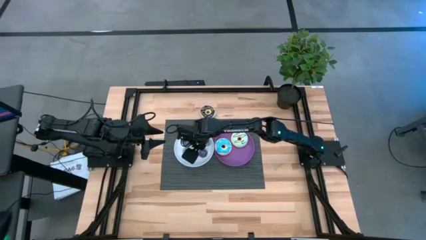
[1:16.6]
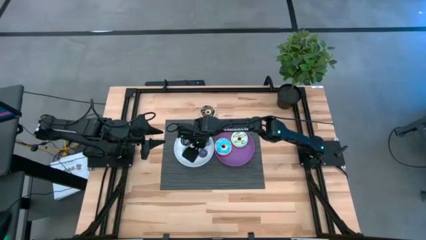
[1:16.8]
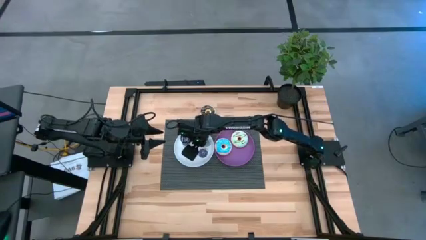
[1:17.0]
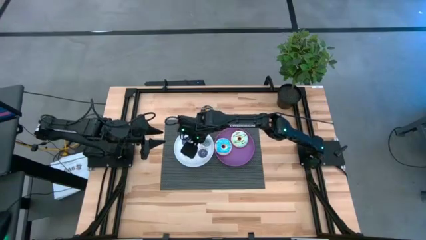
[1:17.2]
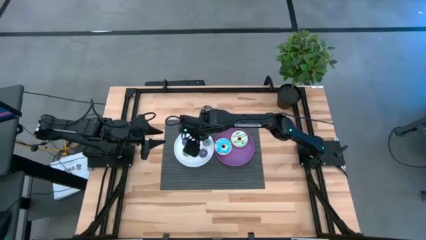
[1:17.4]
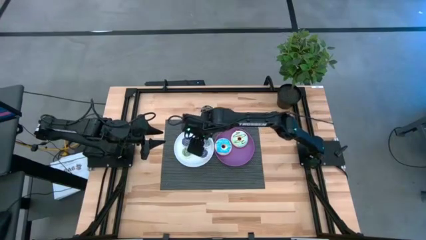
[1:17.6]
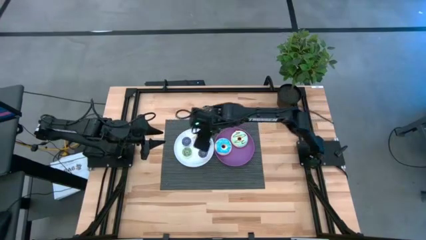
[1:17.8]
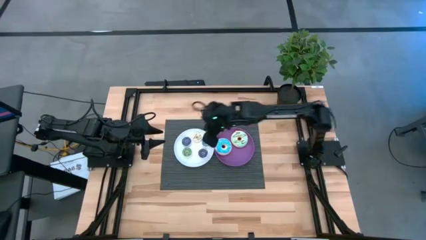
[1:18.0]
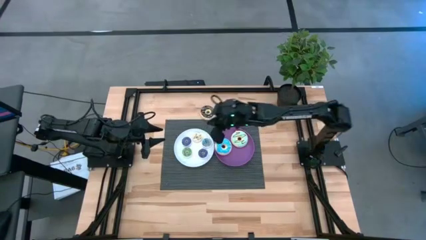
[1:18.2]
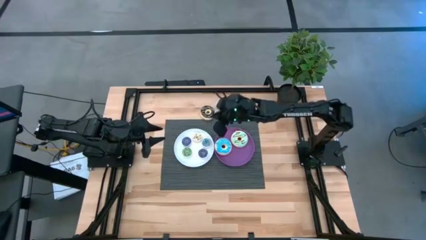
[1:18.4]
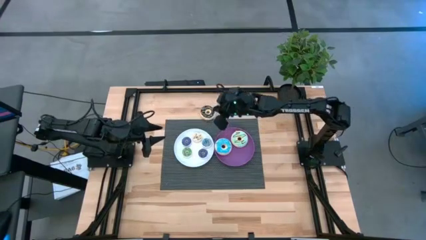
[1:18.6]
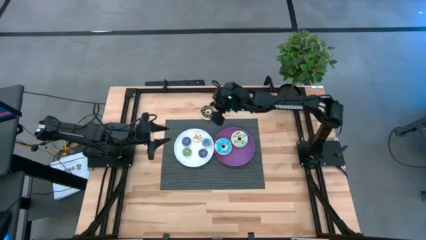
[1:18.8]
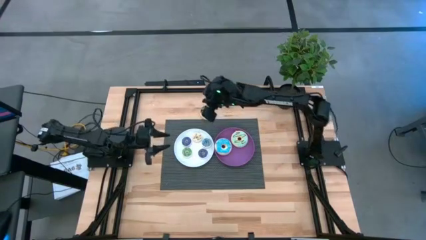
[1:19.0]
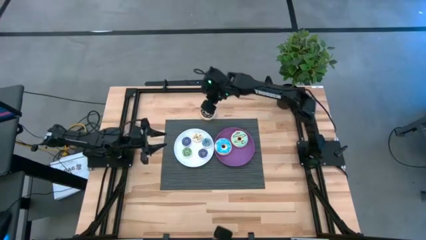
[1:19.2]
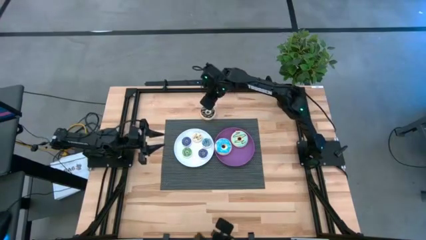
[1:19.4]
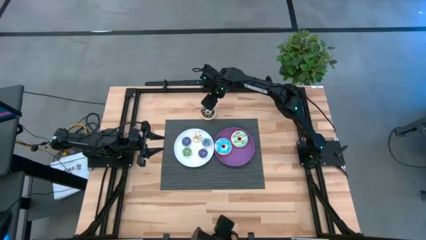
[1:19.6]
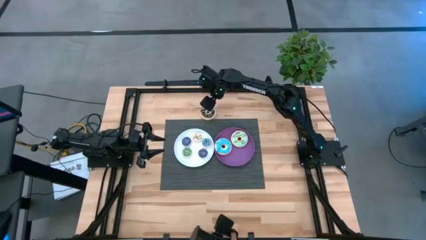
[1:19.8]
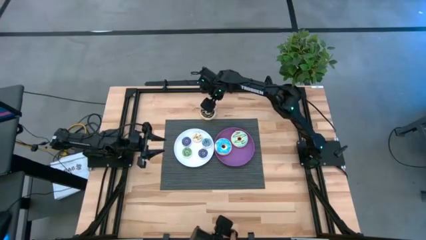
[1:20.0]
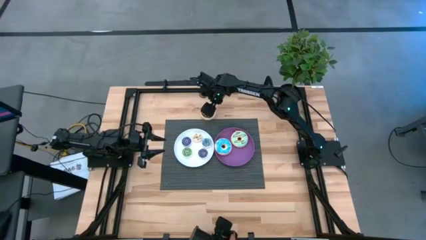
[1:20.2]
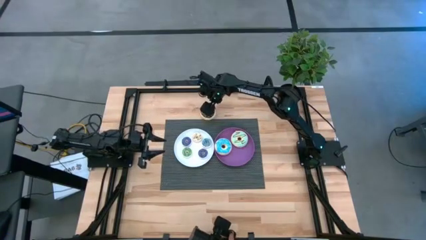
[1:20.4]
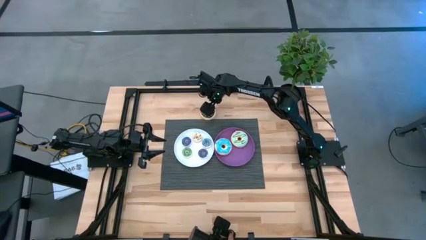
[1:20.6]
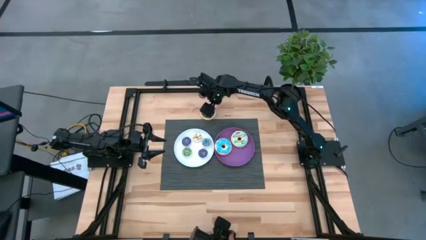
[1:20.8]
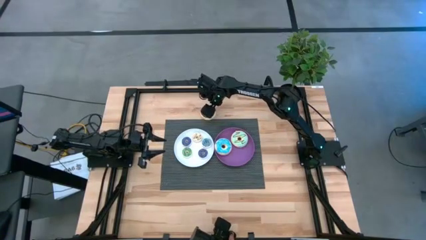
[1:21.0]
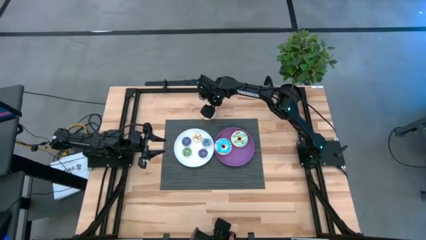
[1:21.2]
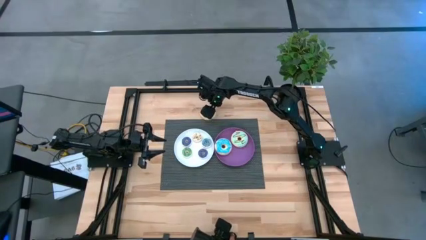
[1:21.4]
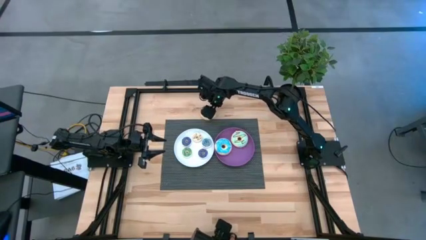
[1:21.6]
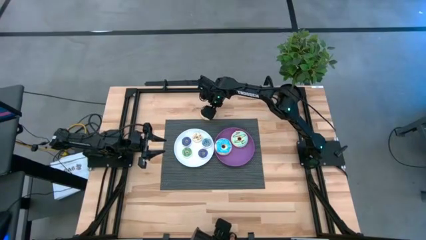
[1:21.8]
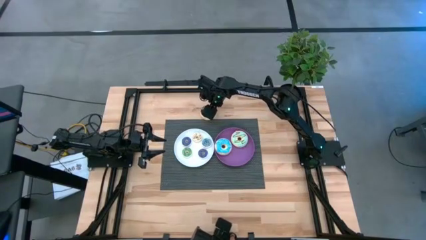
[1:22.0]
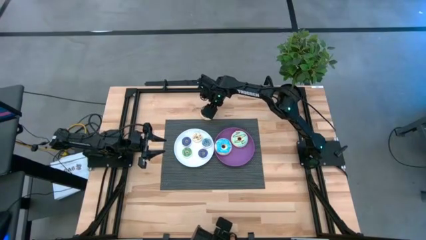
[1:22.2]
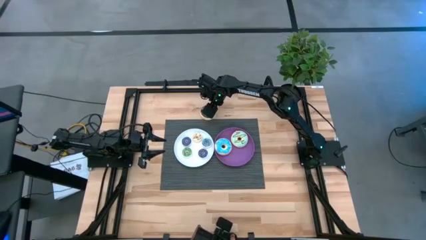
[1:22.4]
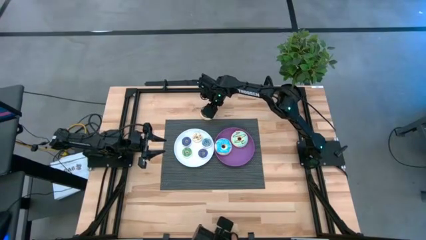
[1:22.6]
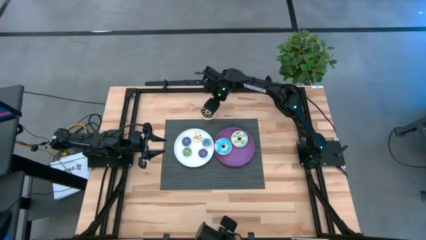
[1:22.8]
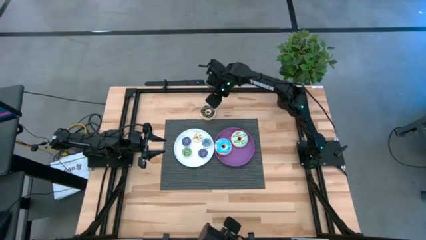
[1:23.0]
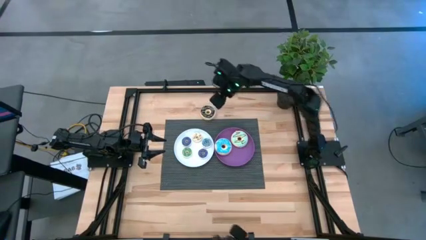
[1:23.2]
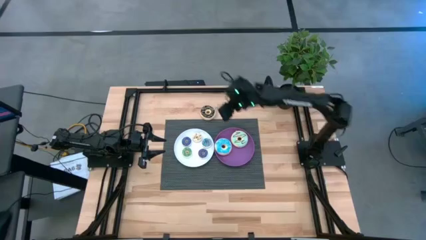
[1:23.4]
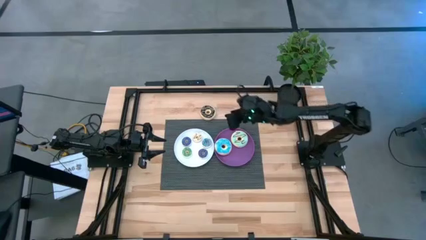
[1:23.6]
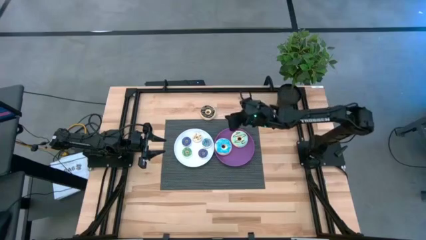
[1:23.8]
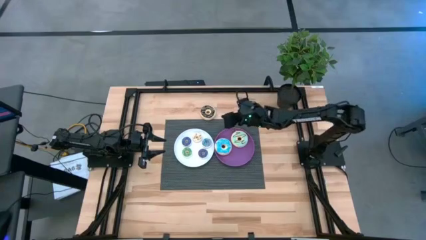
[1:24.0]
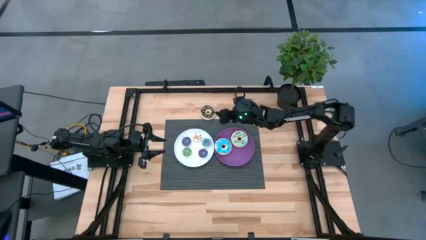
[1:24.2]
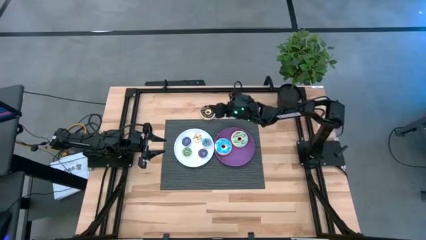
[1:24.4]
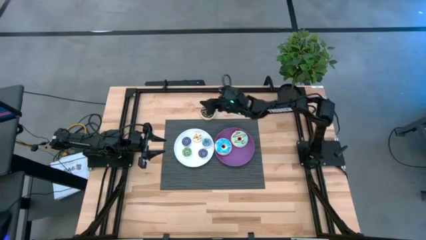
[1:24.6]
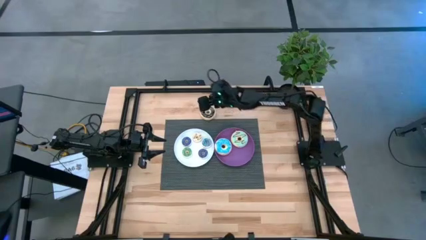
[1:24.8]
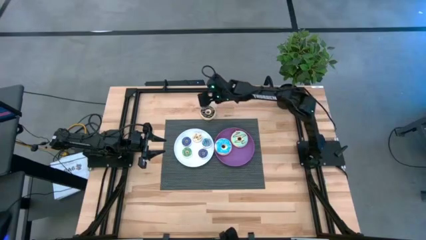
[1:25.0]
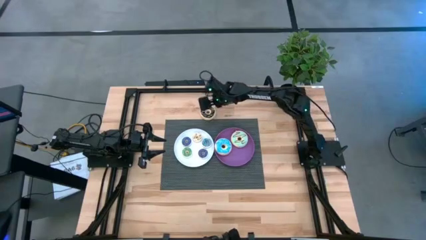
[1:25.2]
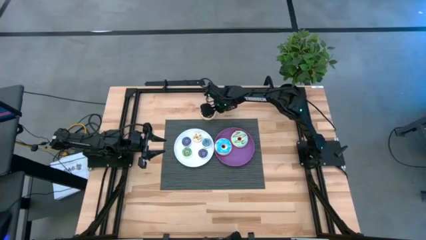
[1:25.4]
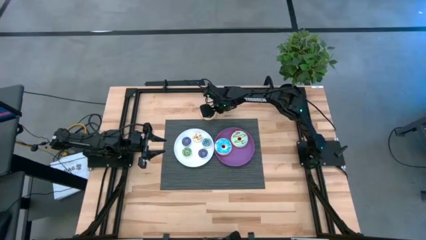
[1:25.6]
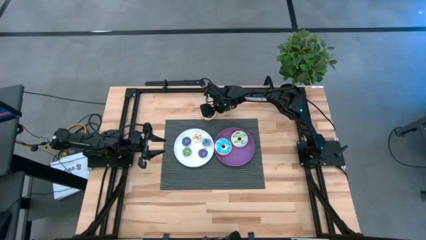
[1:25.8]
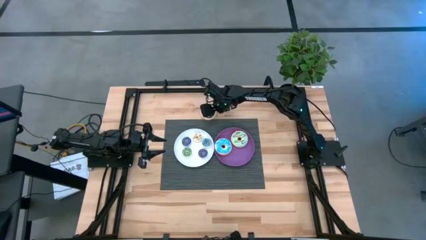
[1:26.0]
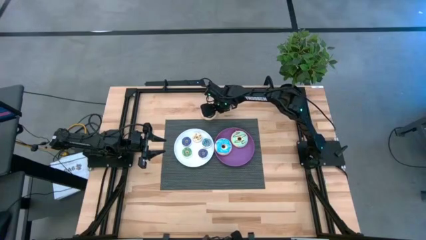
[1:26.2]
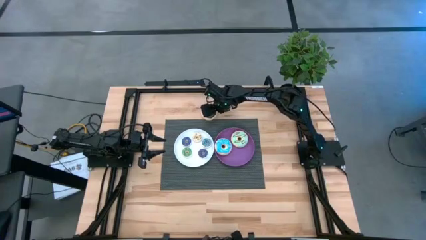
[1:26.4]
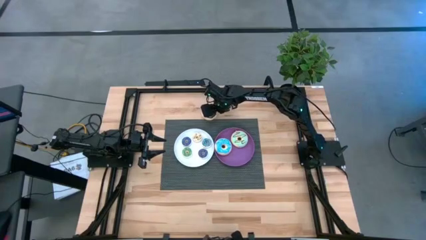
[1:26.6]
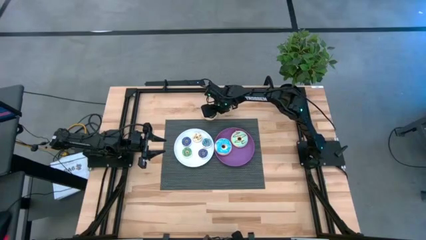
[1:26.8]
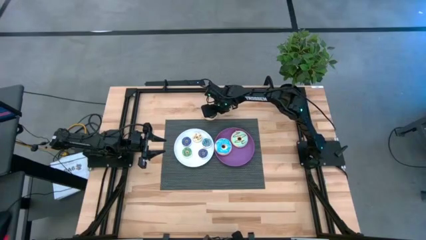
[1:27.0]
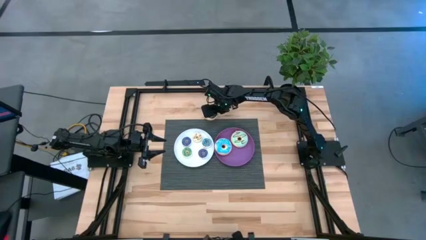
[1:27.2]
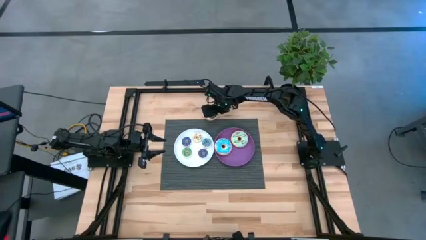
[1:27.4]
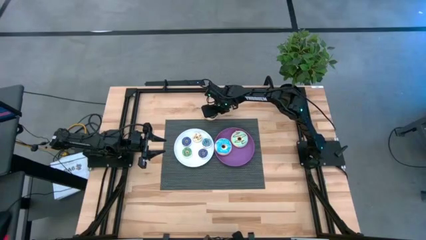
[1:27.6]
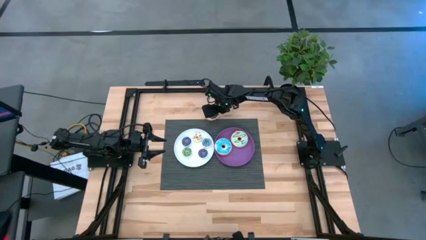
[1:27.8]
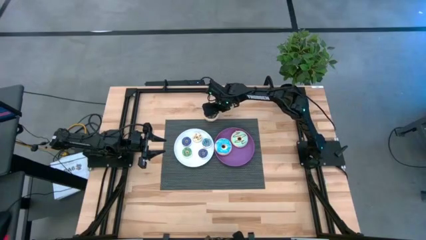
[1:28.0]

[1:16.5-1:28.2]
Task: Pick & Place donuts
Put the large black donut on the violet plate

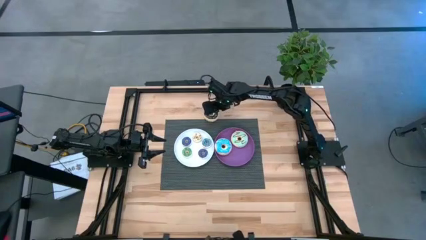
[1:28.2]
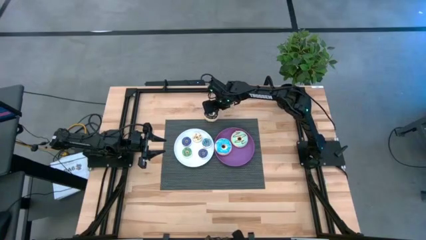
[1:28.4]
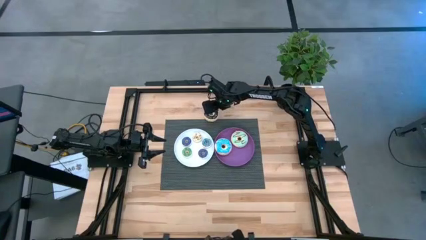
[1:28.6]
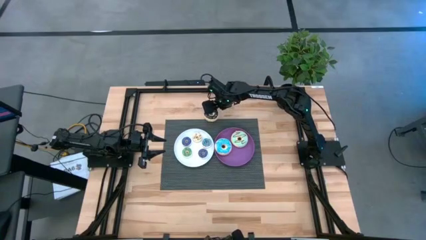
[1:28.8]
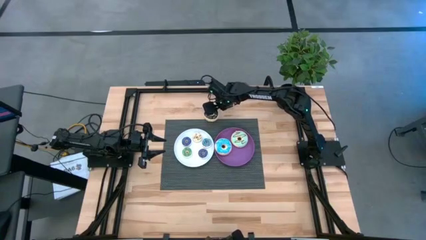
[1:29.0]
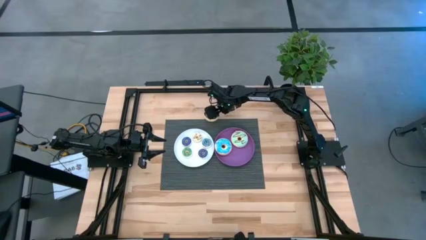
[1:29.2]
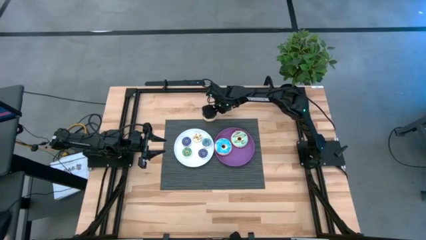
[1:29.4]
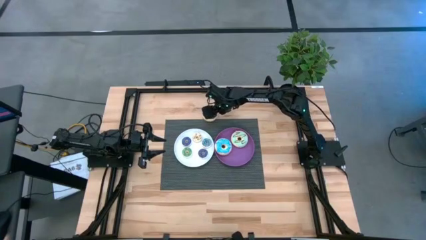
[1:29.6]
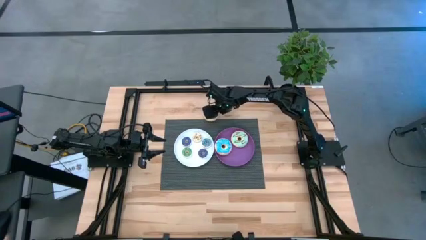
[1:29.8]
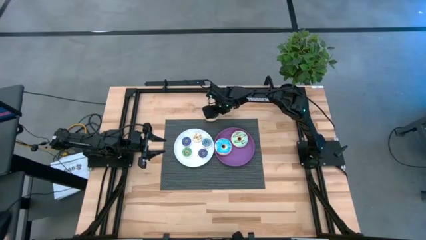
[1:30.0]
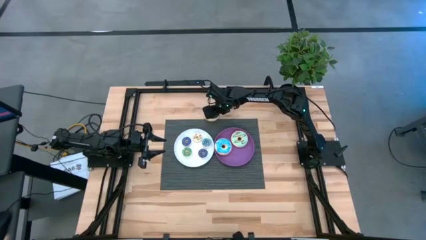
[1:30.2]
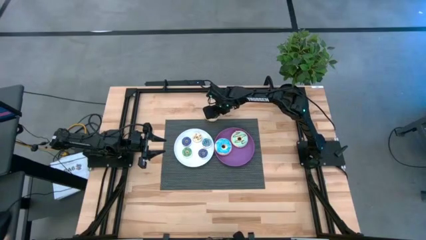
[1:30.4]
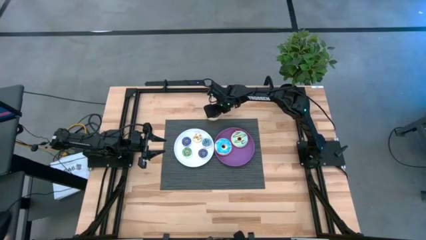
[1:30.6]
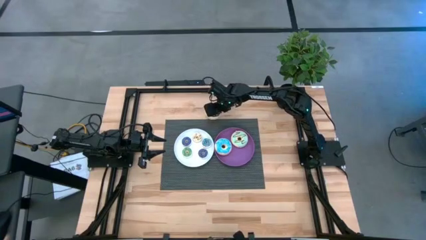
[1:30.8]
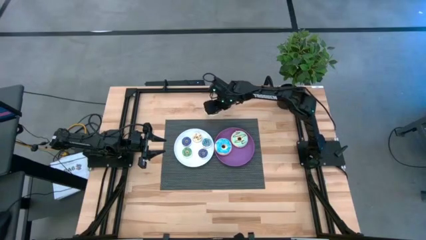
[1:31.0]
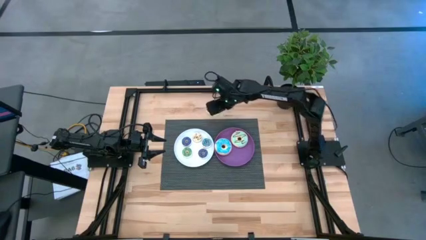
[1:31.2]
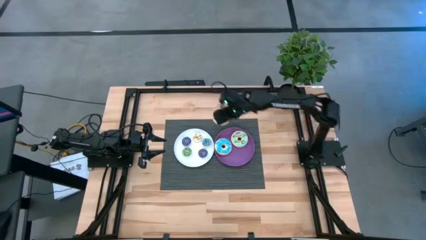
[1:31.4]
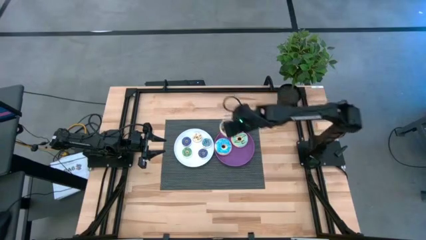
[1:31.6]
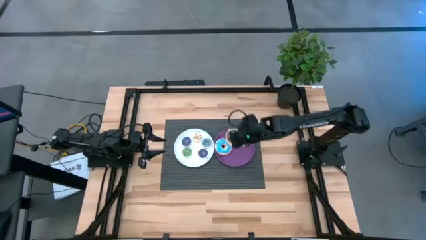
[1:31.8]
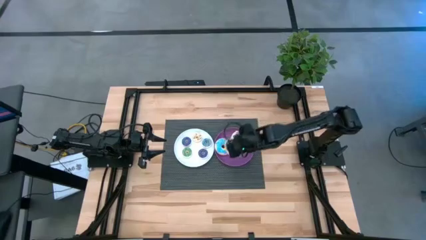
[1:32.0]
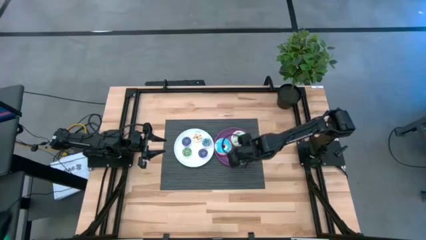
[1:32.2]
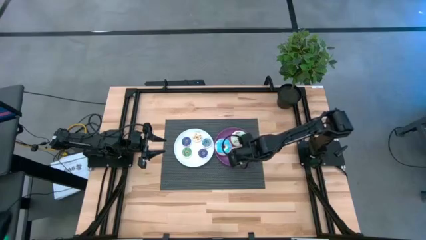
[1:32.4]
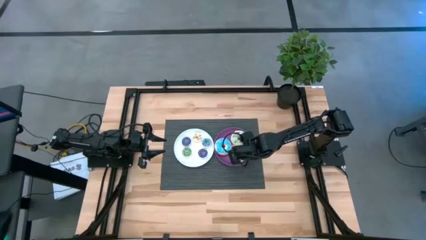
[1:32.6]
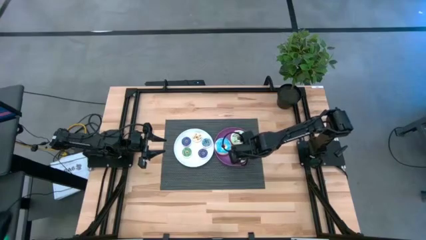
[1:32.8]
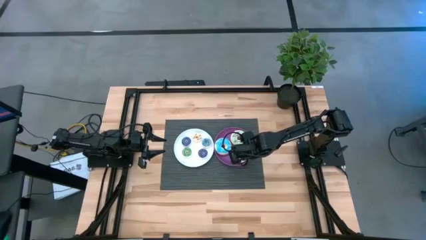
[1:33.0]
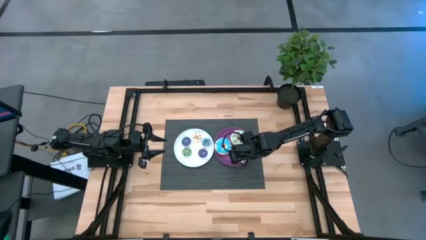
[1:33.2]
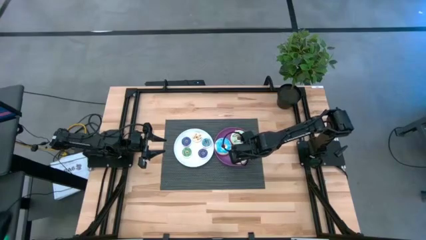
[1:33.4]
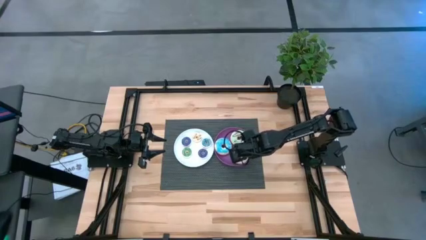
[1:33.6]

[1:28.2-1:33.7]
Put the large black donut on the violet plate
